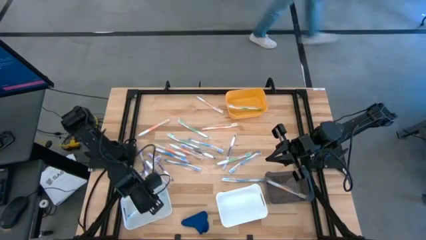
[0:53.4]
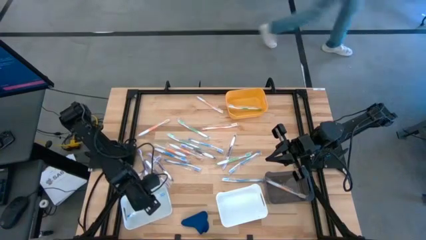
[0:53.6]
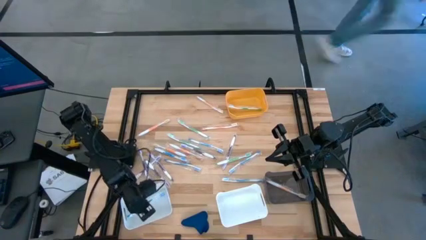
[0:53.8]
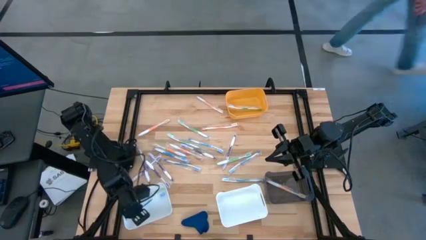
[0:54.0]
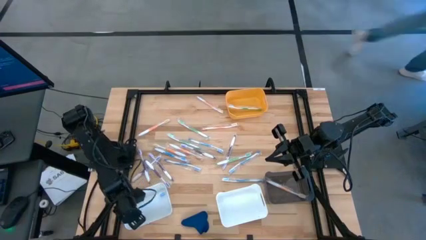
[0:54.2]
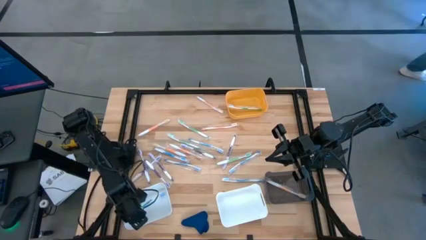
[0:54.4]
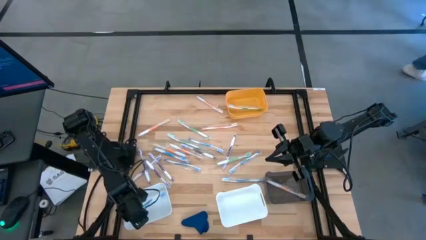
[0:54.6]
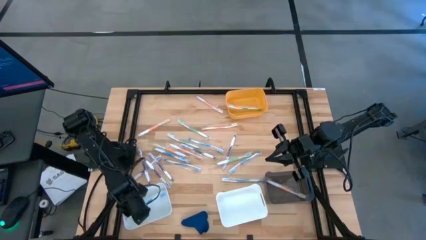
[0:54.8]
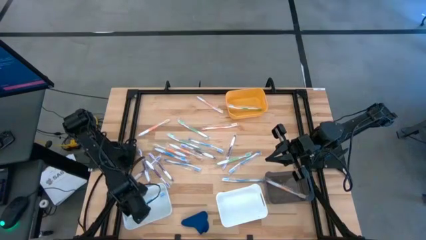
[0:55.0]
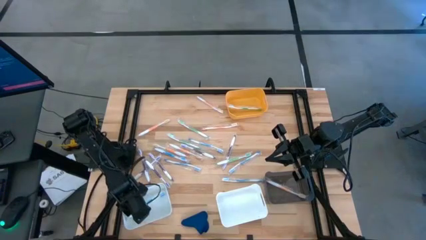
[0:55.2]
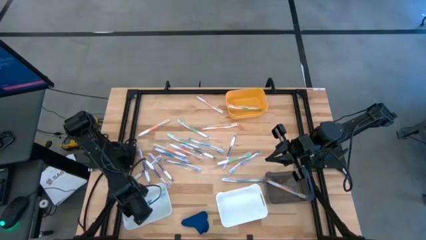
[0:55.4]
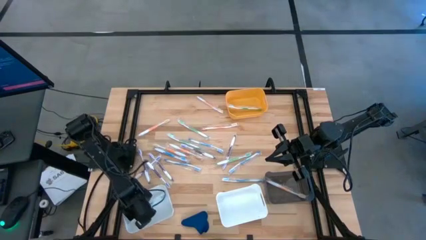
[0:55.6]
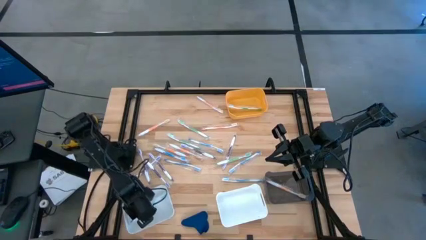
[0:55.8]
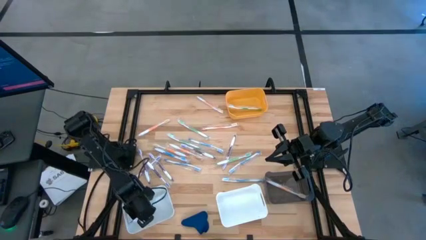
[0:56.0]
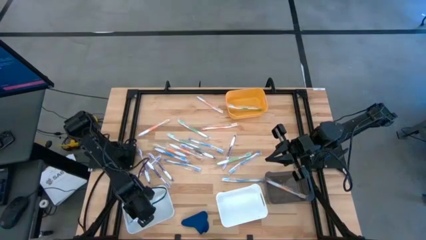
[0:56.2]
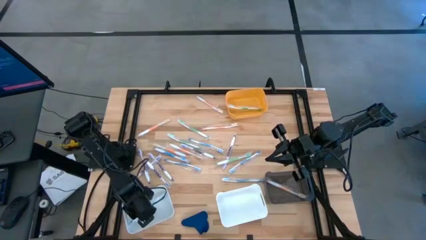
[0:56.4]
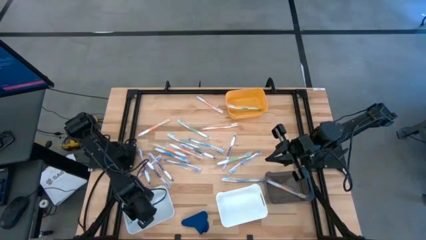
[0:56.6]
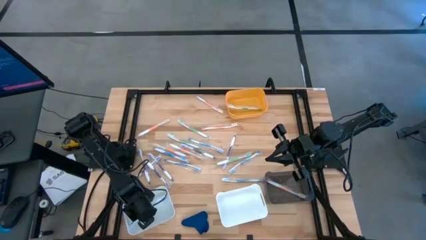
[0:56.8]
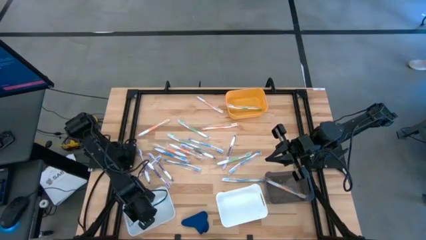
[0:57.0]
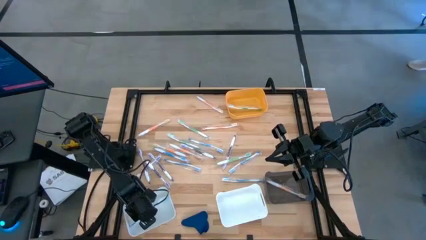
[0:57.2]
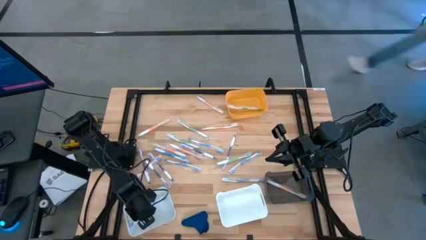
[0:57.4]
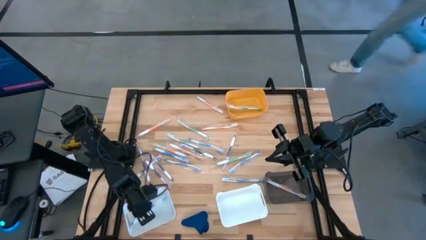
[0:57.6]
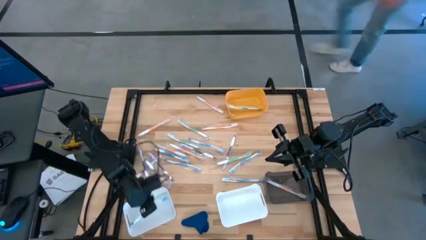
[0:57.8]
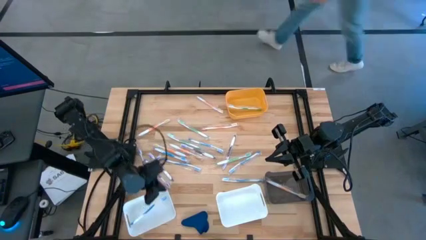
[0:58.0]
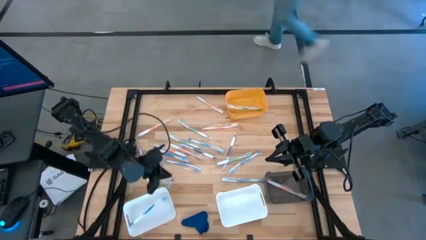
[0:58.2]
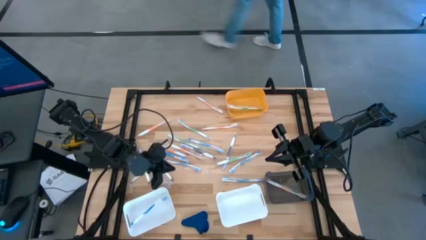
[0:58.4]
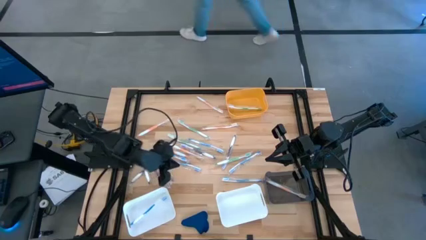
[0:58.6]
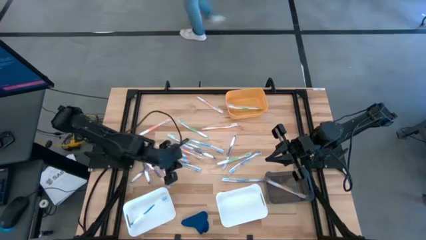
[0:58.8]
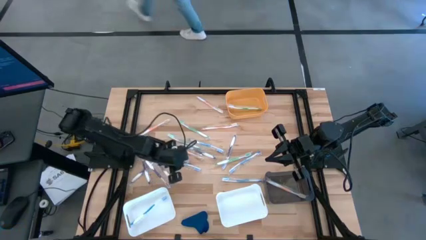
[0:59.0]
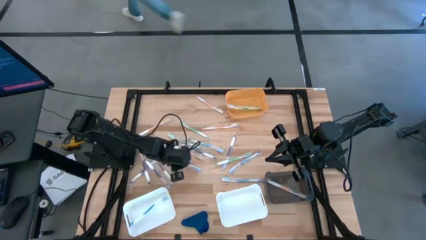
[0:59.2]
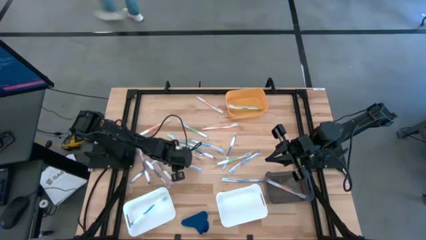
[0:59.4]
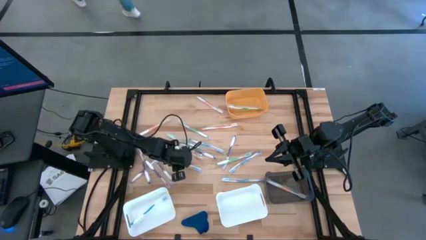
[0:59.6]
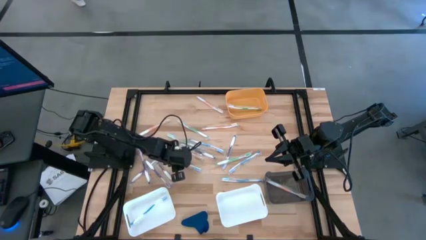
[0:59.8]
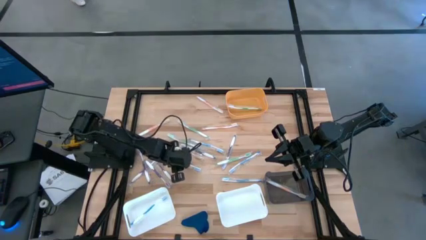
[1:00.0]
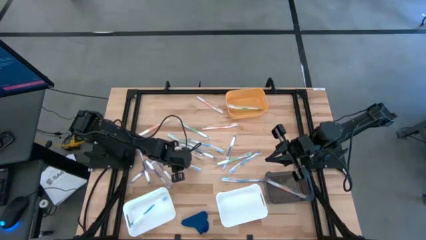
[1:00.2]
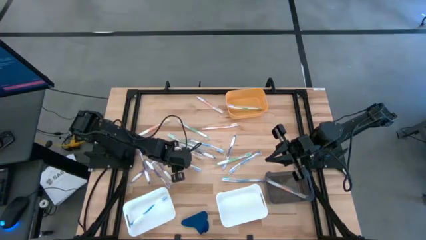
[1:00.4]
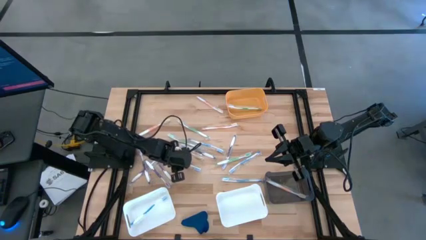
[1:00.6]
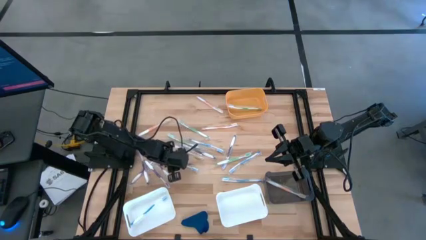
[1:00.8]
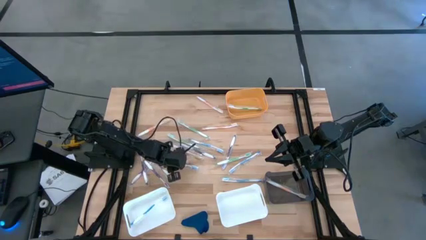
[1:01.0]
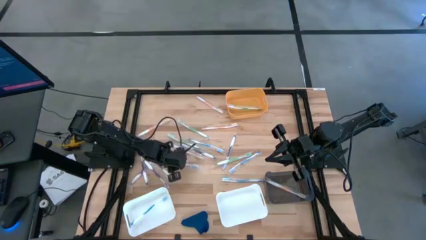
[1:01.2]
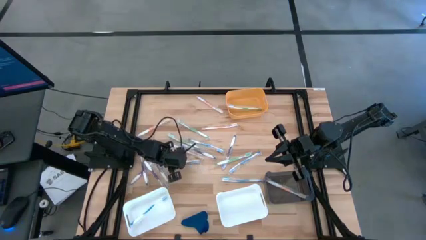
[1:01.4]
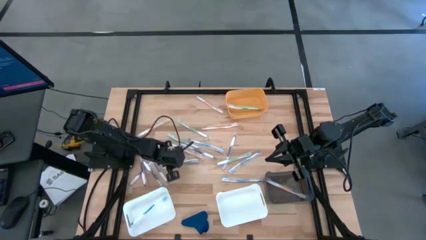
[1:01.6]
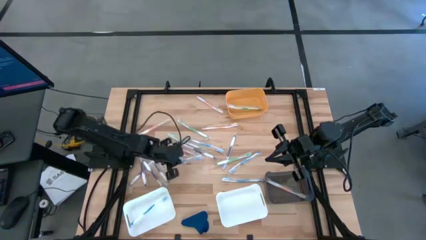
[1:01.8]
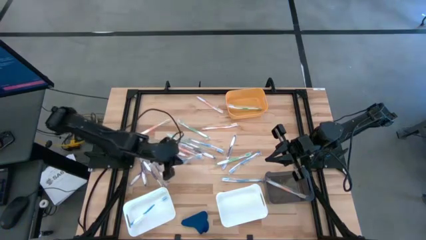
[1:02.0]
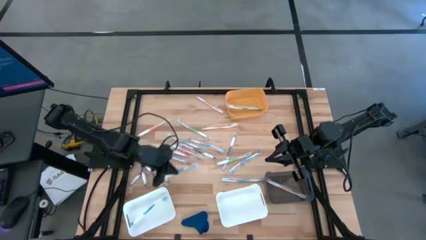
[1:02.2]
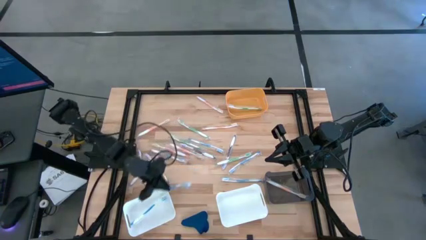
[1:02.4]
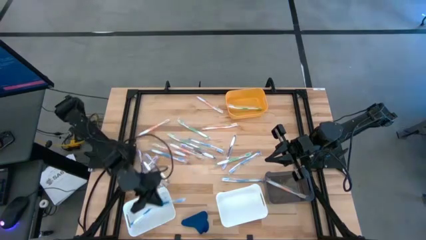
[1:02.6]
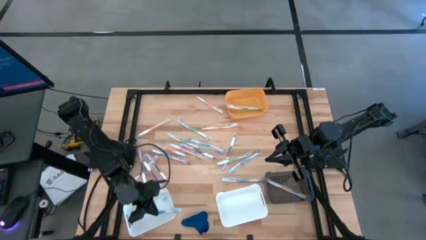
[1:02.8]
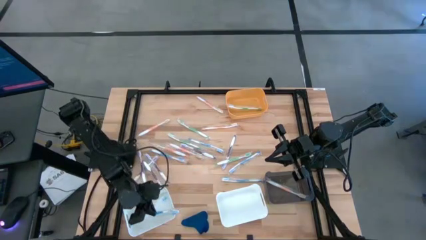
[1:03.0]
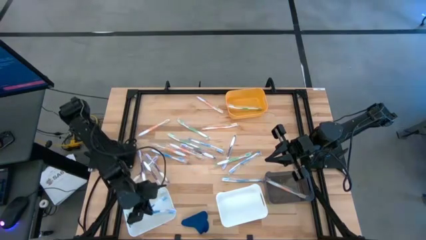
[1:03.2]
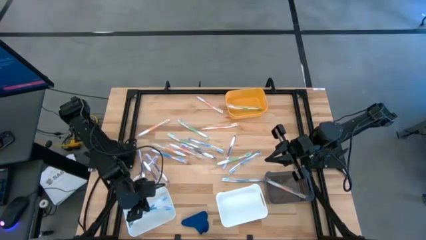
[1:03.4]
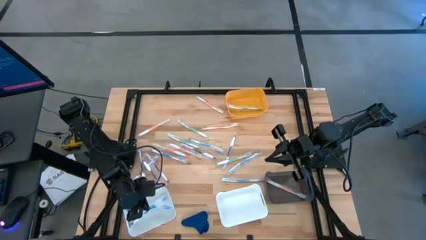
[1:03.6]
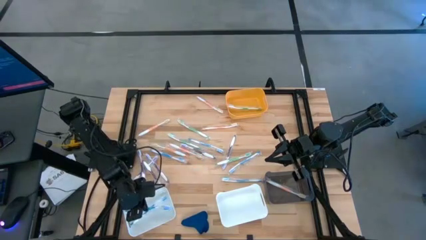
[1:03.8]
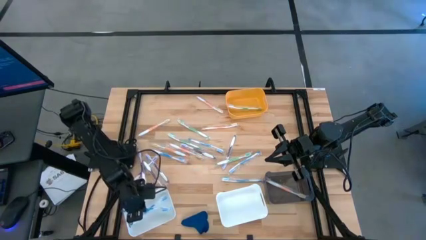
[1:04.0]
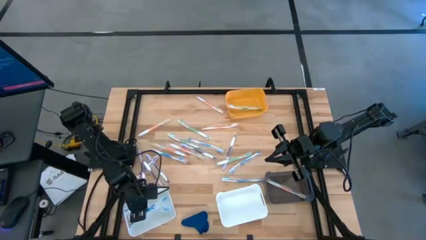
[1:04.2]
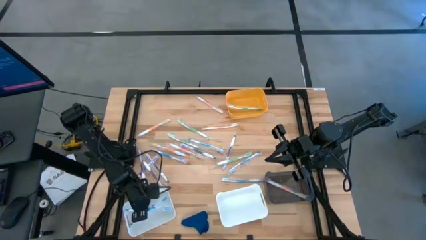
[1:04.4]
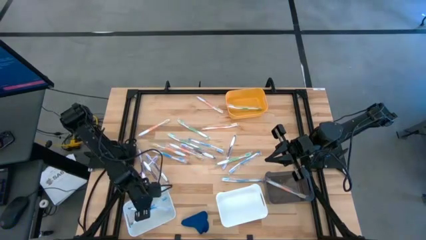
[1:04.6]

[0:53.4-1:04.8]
Task: Pick & Place Toothbrushes
Put the blue toothbrush into the left white bin

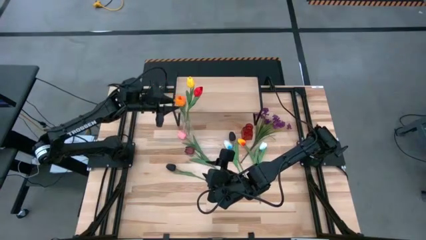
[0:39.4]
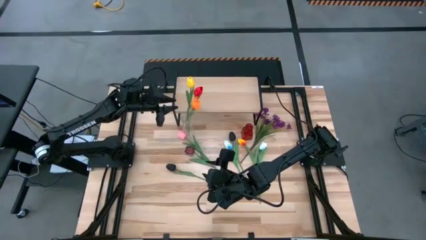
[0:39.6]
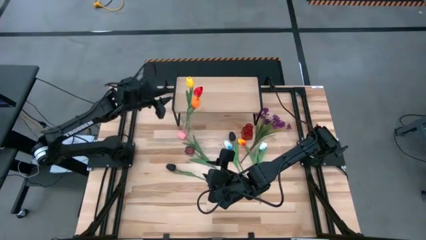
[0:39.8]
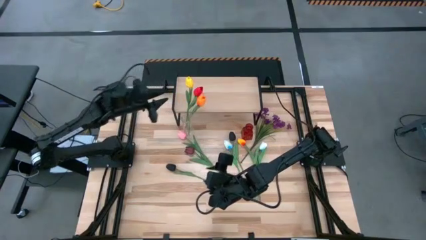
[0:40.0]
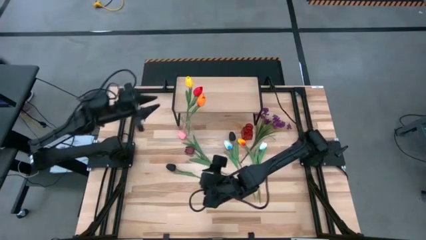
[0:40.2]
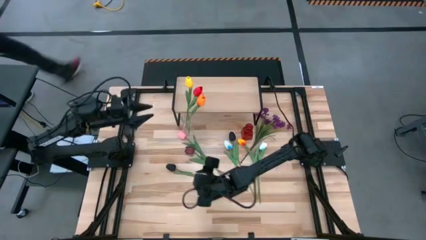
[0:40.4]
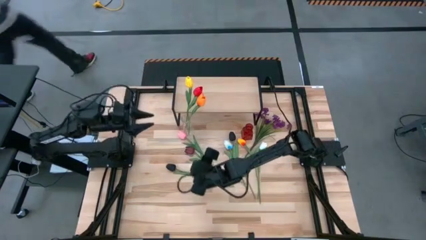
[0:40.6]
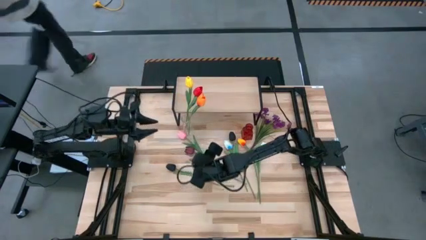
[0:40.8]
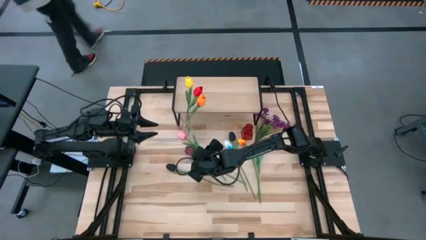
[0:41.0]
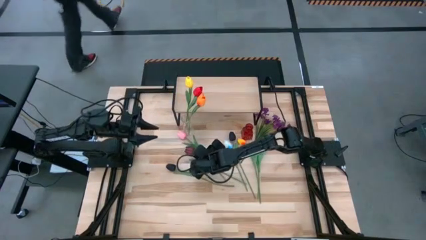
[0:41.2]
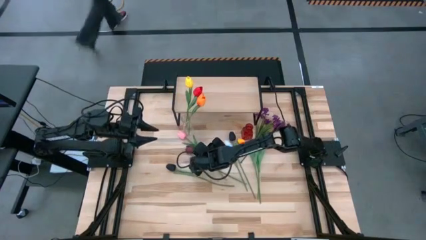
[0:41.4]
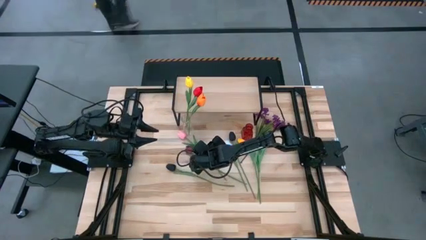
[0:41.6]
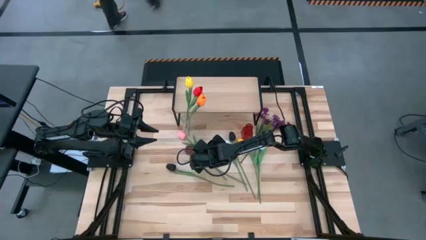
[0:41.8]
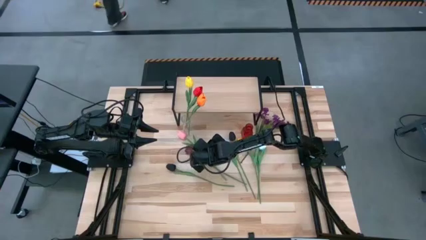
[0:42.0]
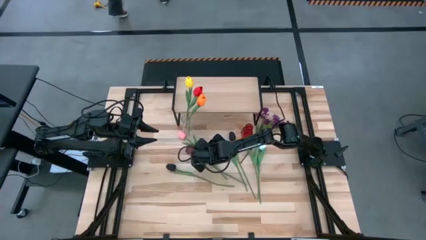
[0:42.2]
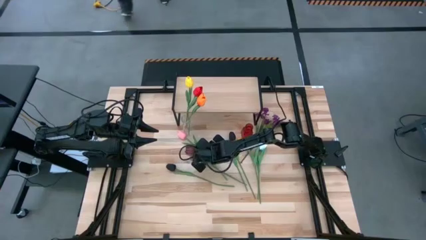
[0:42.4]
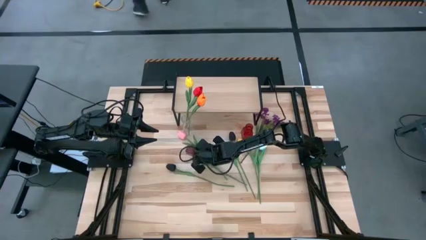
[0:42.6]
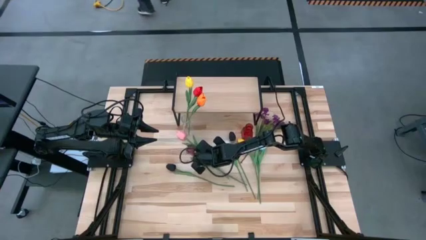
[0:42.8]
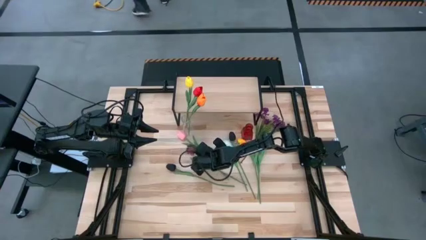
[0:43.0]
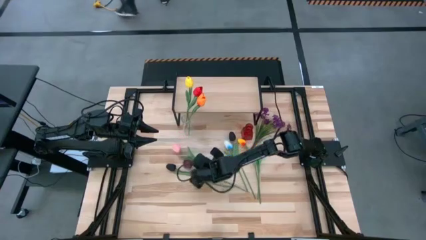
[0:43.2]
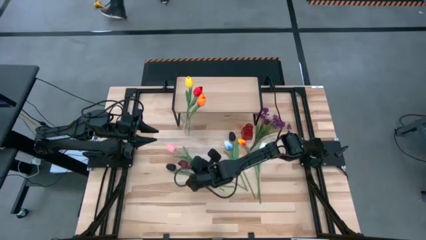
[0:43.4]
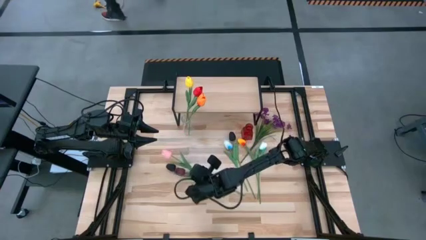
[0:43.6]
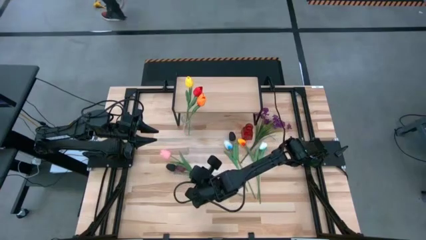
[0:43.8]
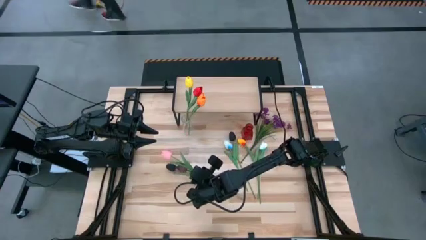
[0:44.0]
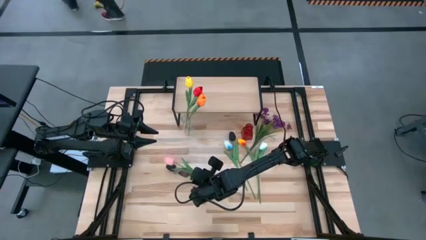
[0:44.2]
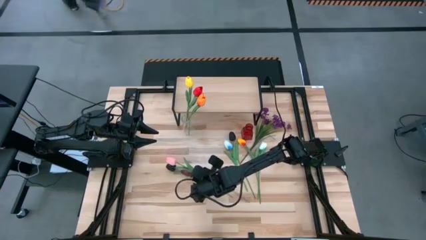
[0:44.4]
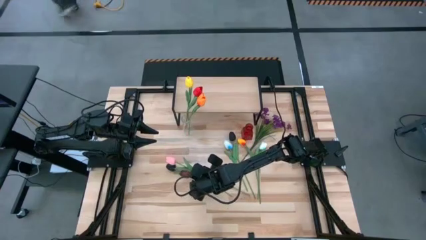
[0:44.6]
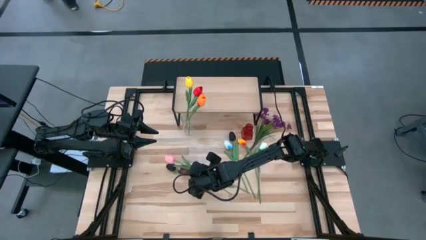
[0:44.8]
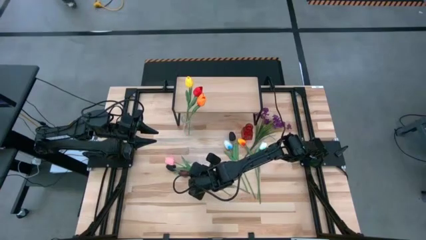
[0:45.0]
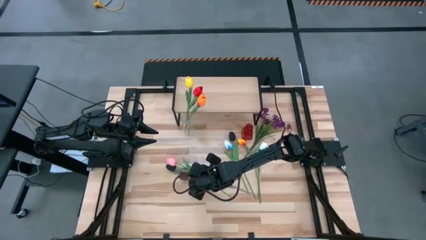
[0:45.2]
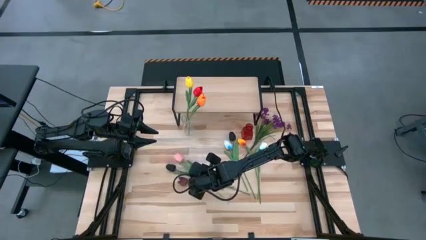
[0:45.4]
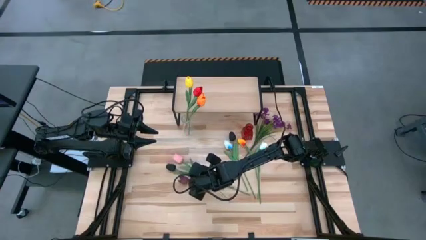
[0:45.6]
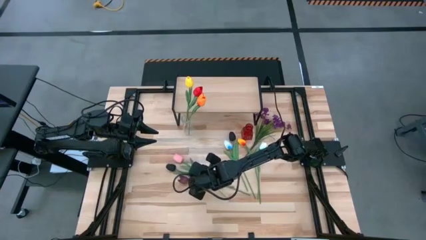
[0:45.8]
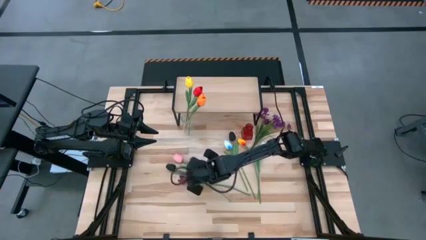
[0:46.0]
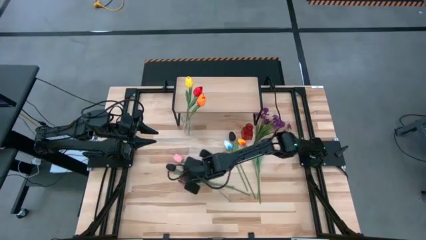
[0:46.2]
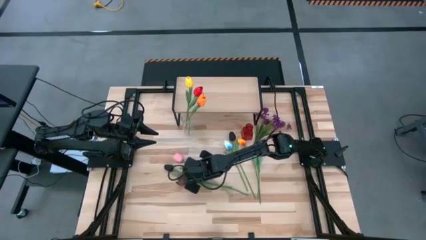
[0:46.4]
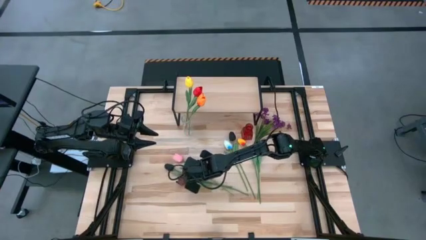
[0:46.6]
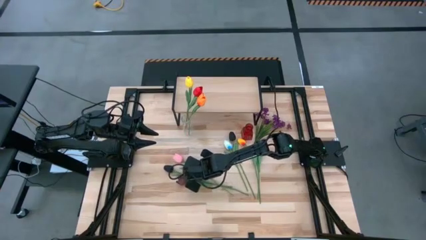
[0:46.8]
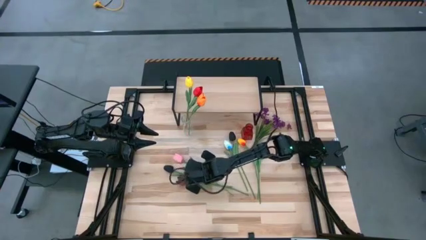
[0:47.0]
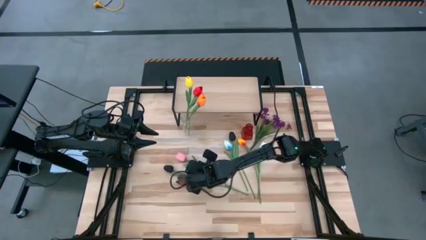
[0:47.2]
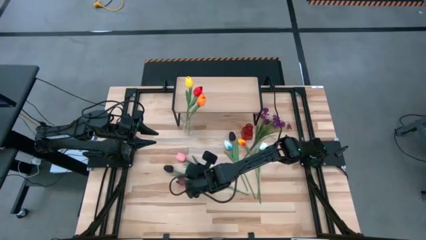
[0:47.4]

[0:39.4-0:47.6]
Task: Pick and place flowers into a vace then onto a shelf
Put the pink flower into the transparent vase
